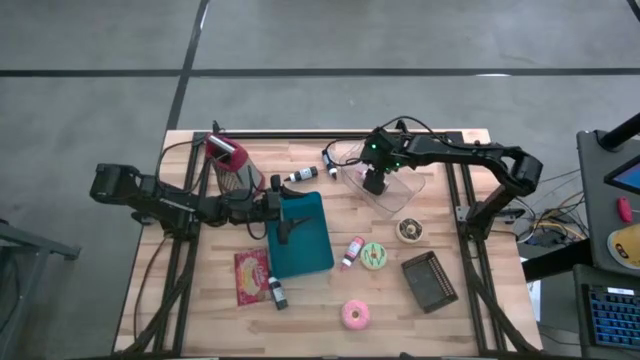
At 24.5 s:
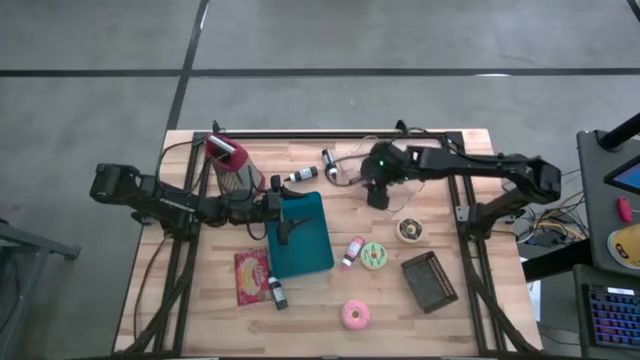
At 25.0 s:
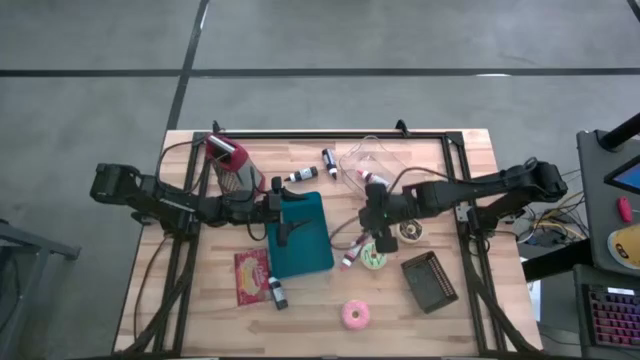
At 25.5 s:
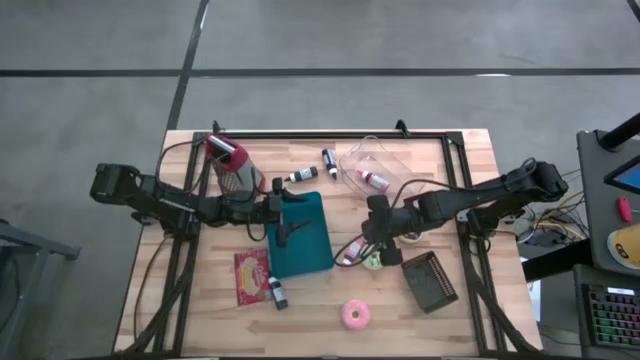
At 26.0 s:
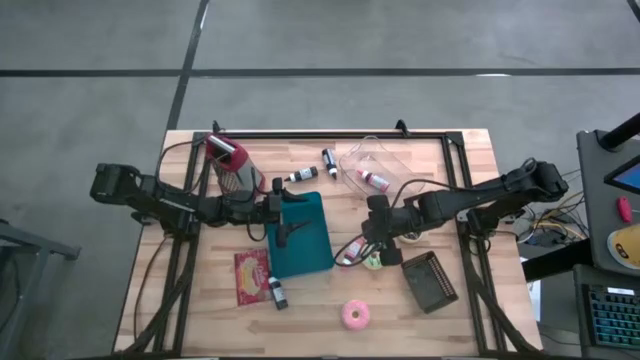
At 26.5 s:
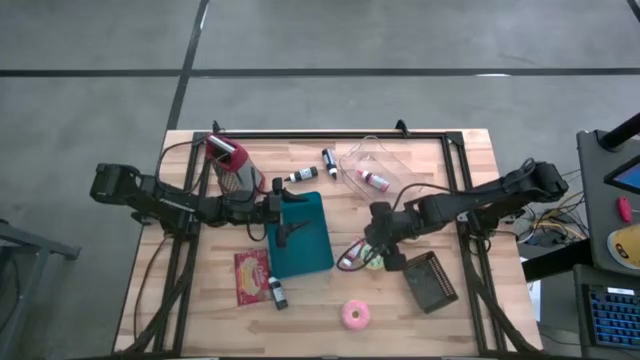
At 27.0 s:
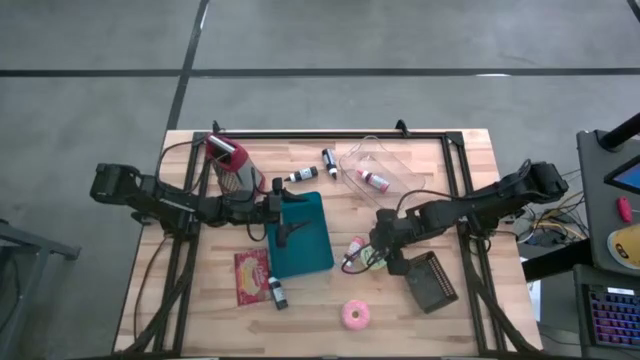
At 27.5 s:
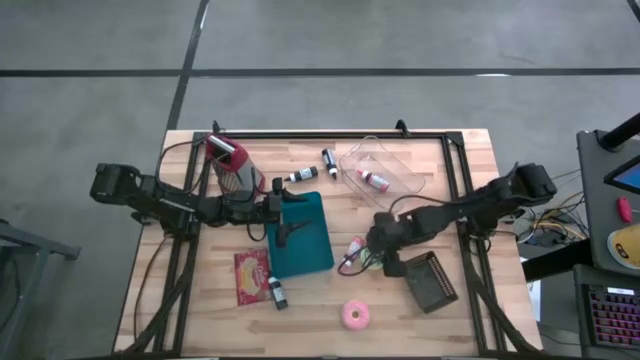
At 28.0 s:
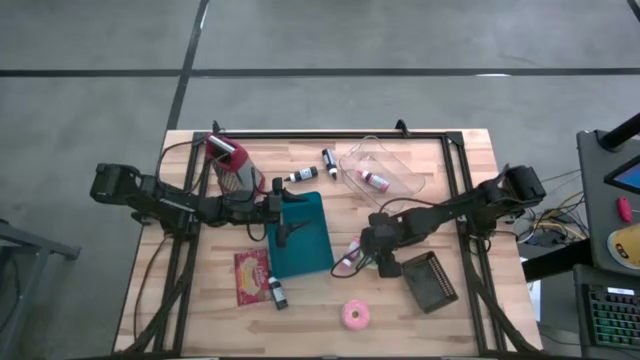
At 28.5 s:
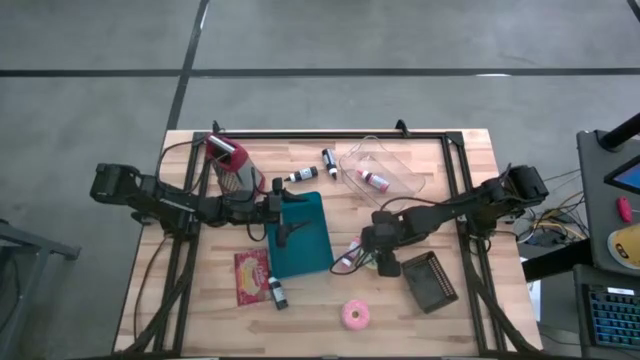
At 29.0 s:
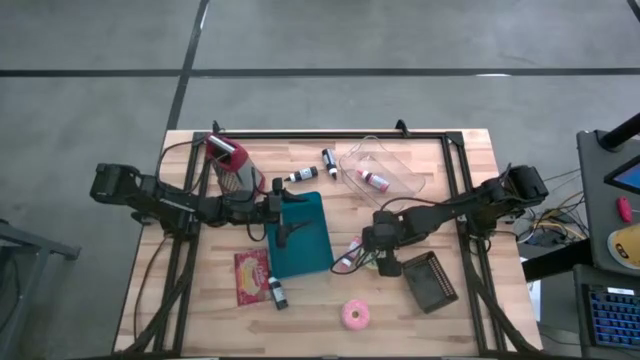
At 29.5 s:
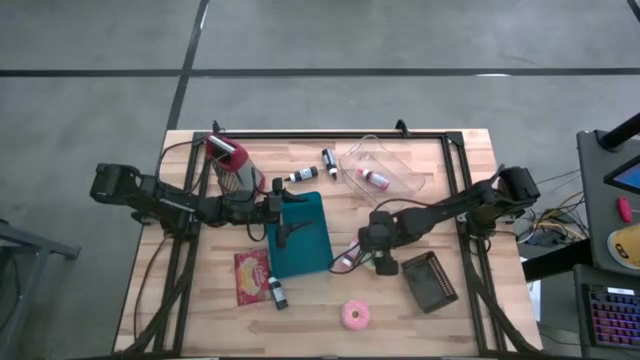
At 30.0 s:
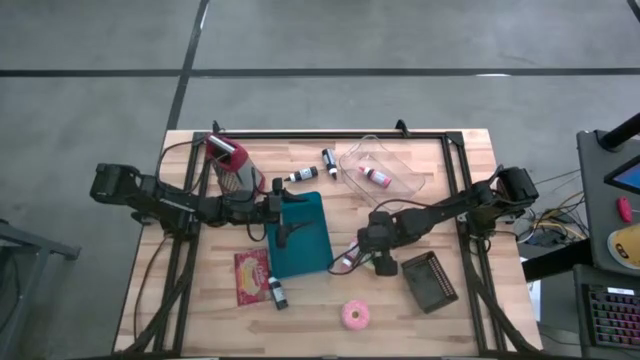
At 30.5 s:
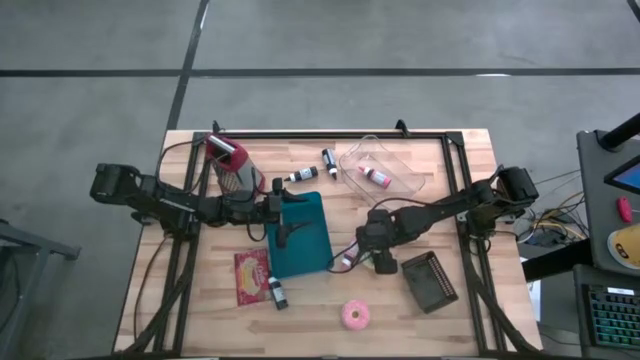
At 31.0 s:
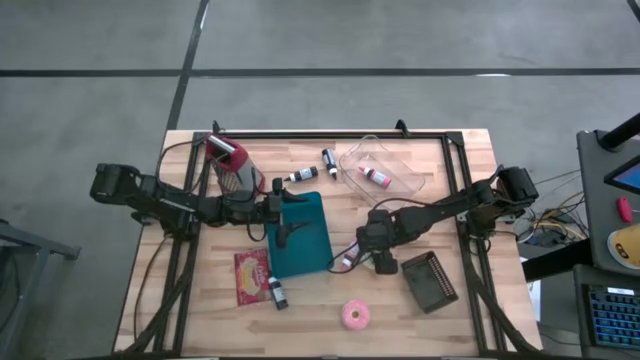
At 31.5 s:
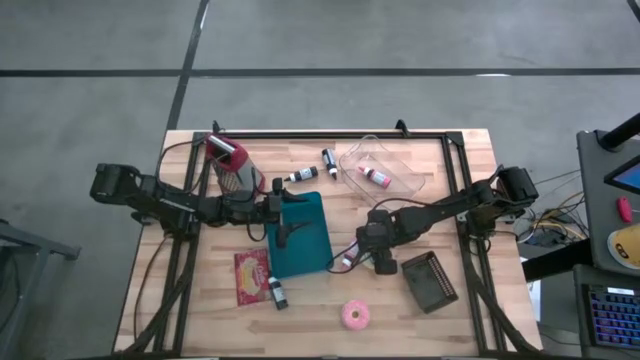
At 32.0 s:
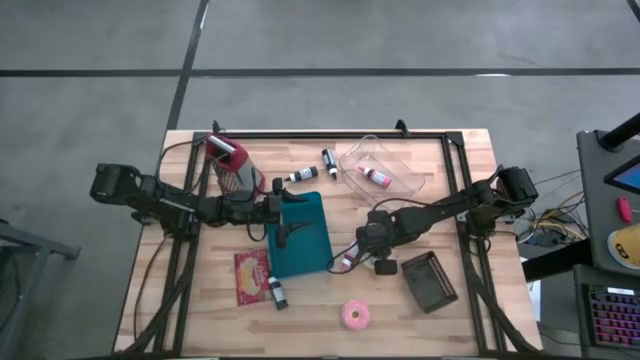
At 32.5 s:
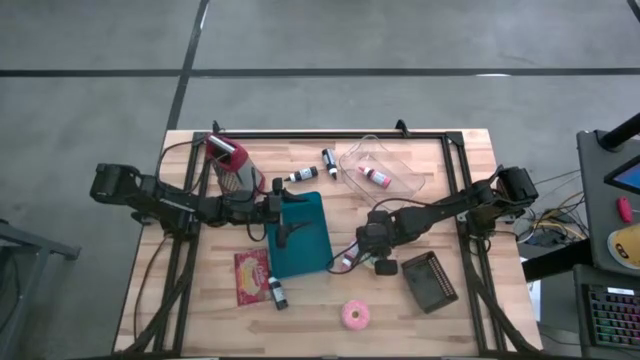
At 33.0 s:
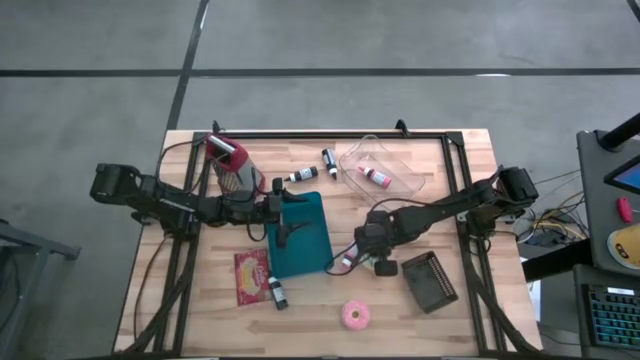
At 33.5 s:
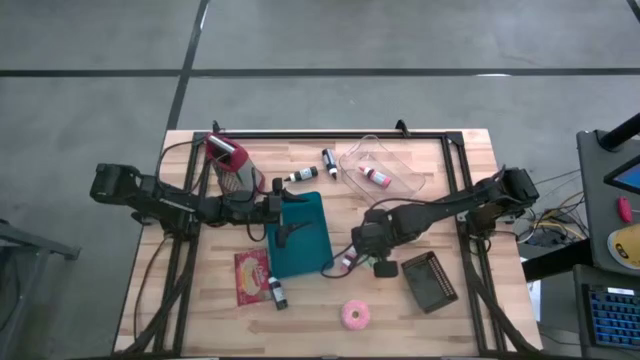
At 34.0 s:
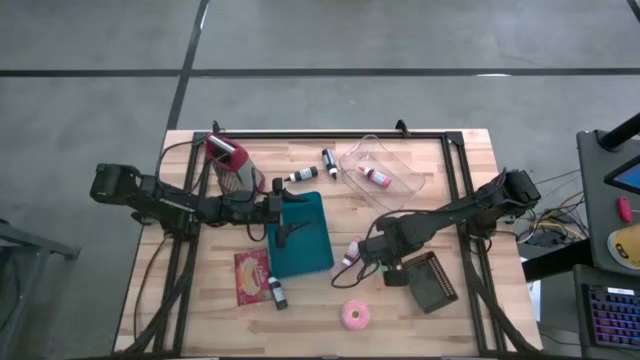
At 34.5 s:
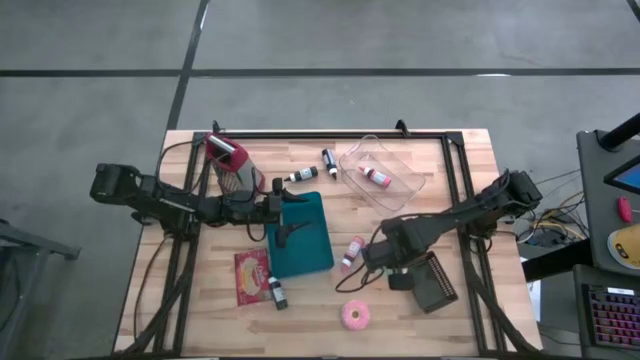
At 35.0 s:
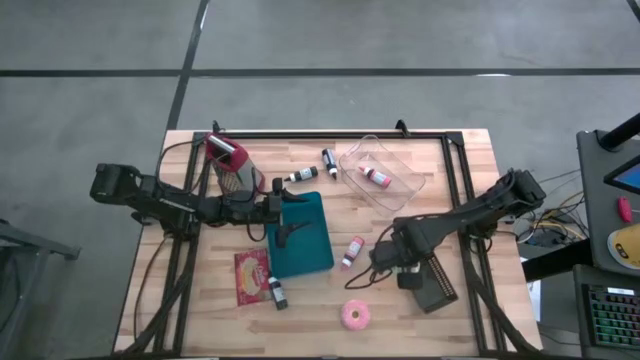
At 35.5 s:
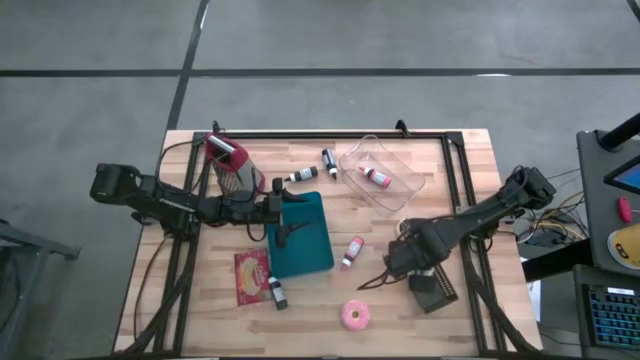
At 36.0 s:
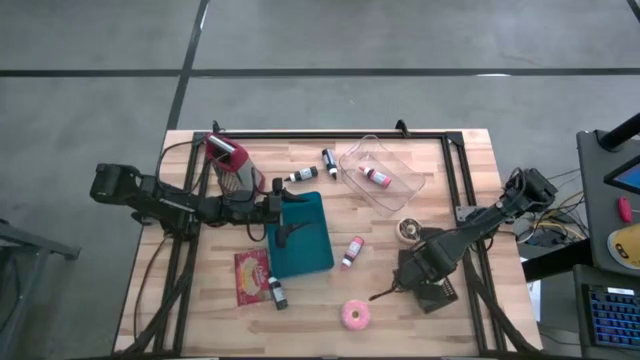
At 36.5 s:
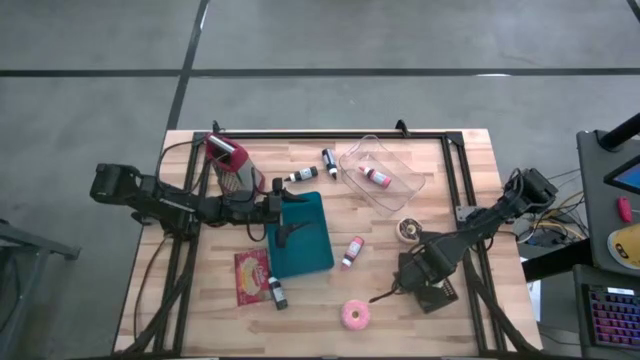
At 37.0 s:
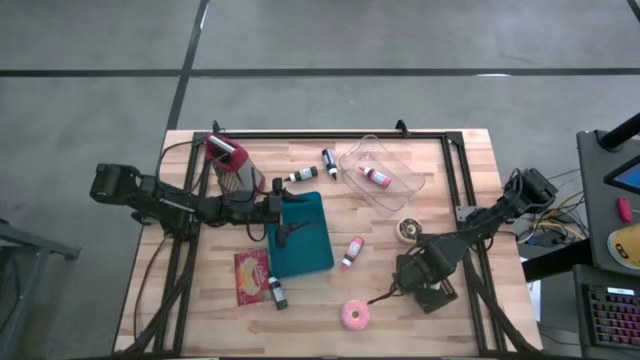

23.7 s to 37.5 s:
Task: Pick & Place Food Item
Put the green donut into the black bin

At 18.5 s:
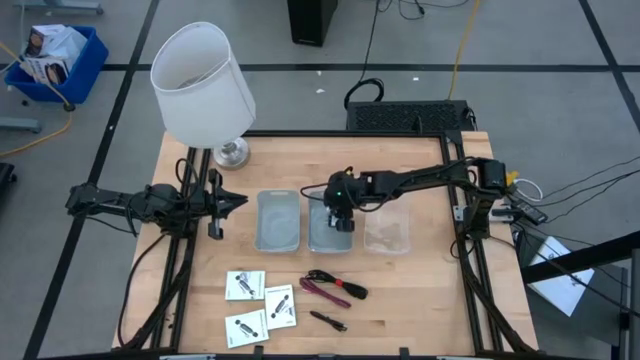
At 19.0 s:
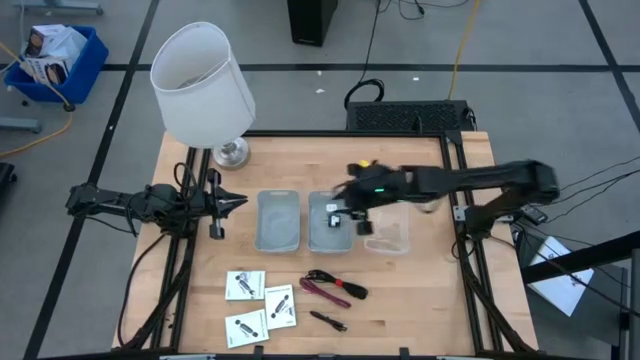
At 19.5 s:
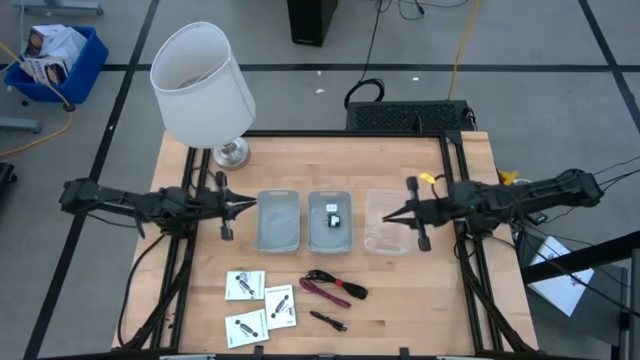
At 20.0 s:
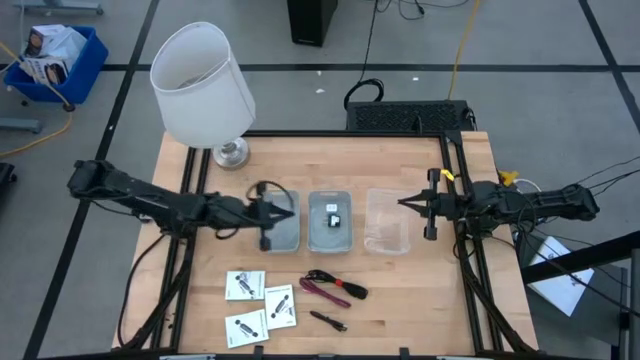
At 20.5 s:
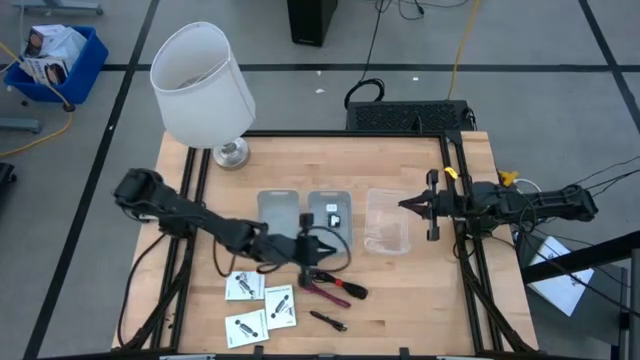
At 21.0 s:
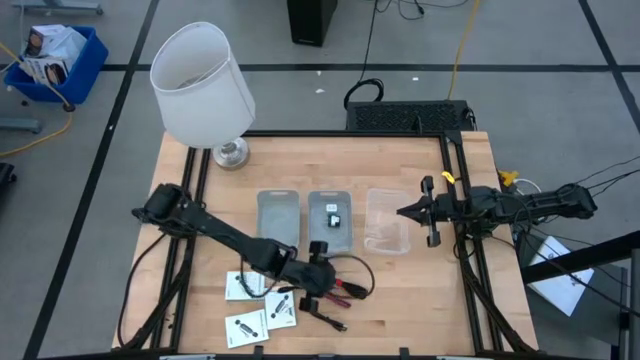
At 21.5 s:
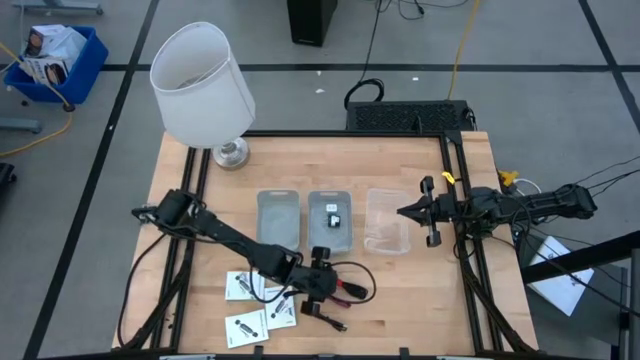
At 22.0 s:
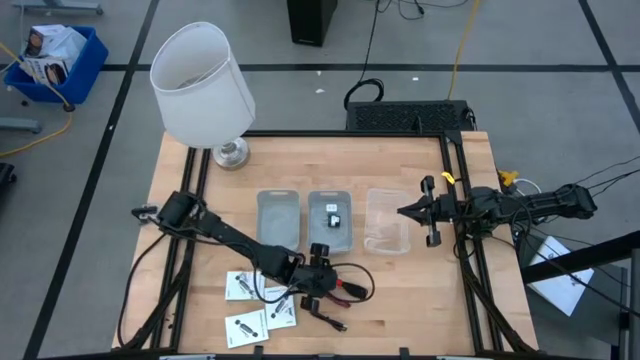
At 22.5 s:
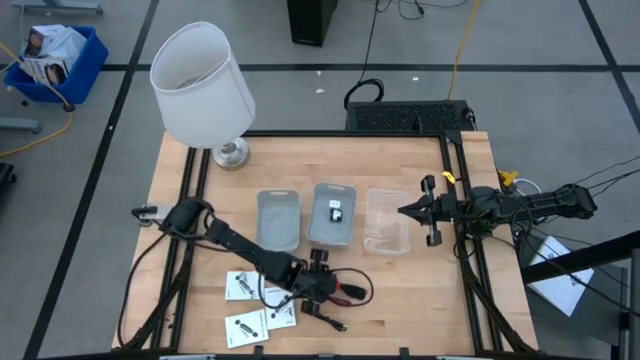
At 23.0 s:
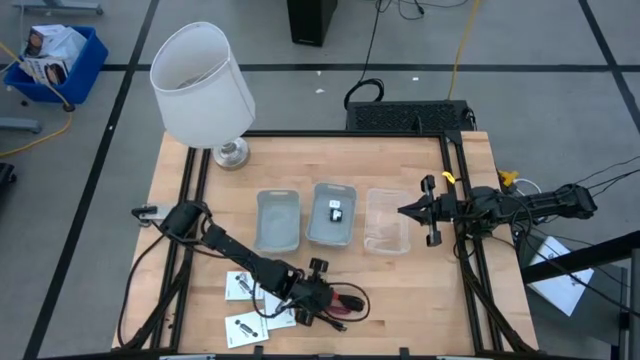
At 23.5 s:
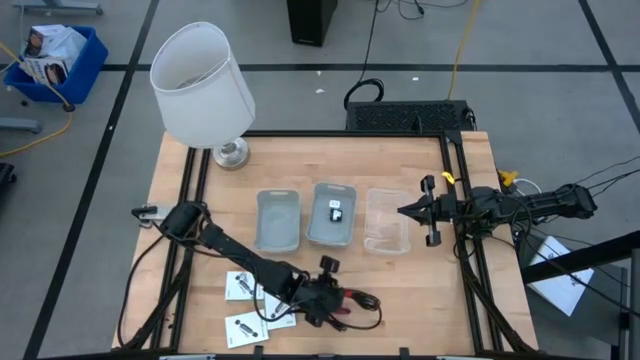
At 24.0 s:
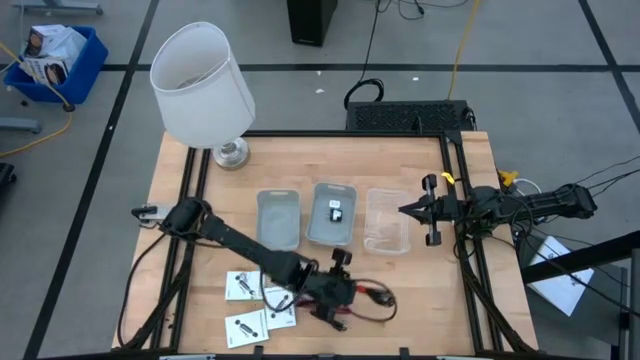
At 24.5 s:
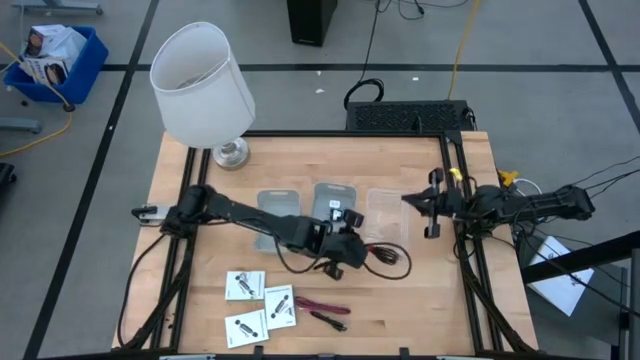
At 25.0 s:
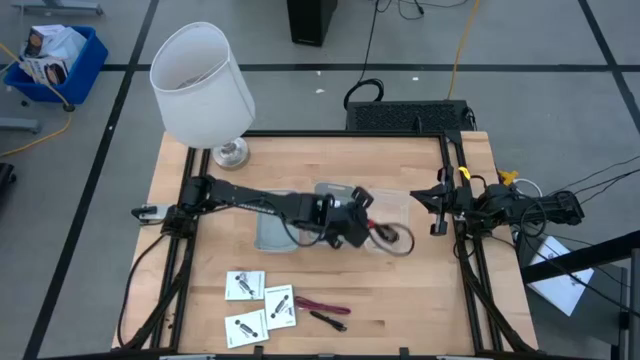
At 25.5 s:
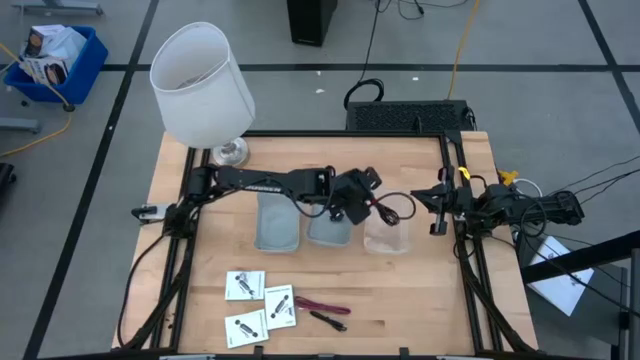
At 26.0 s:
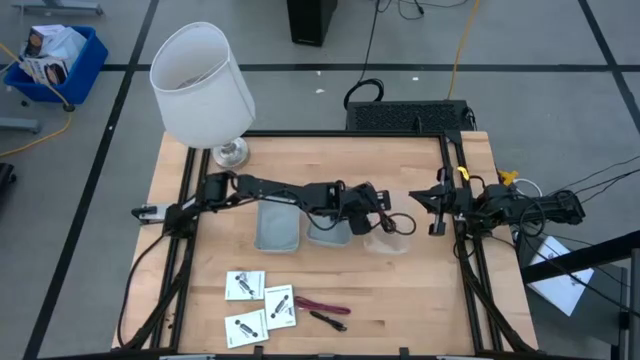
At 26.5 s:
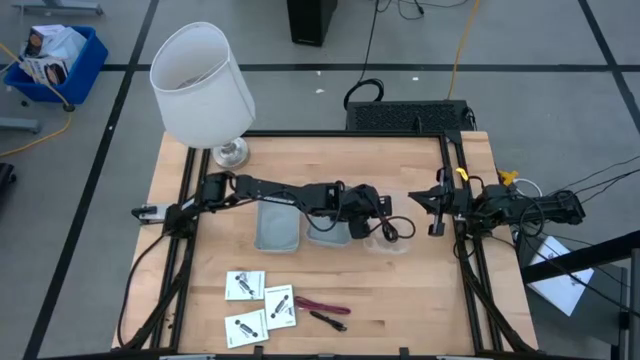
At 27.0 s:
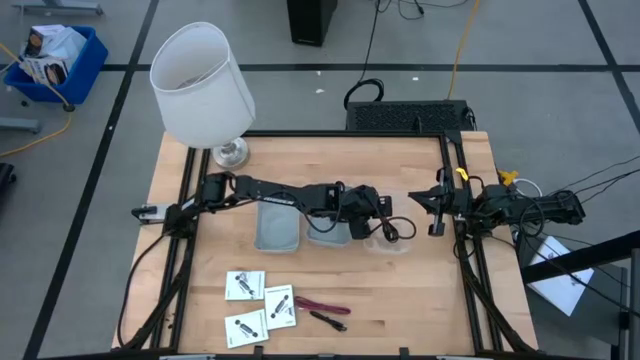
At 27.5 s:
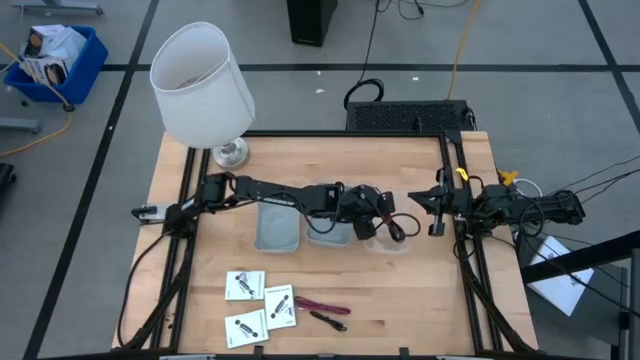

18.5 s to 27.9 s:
Task: Pick and place items into bin
Put the top black charger cable into the transparent bin
